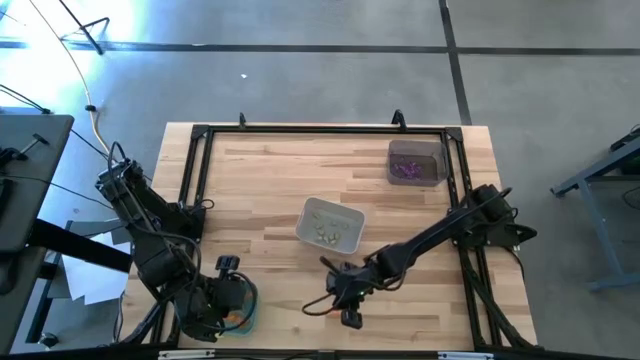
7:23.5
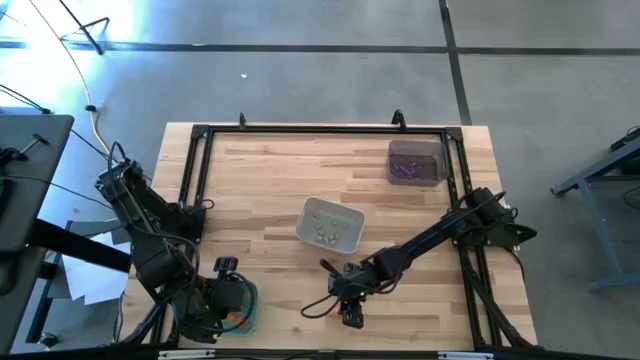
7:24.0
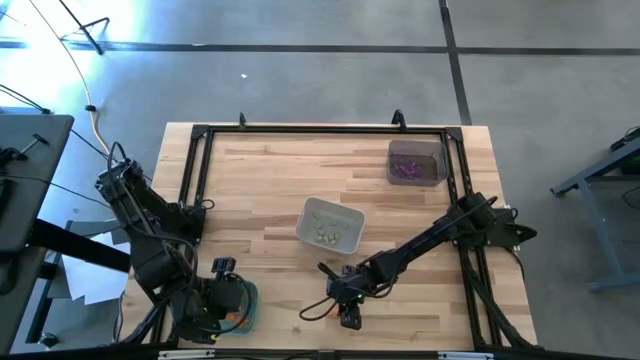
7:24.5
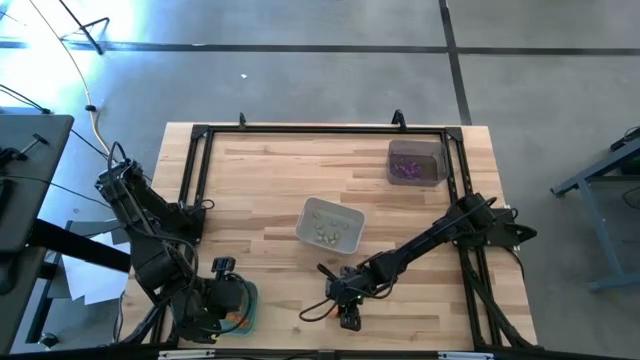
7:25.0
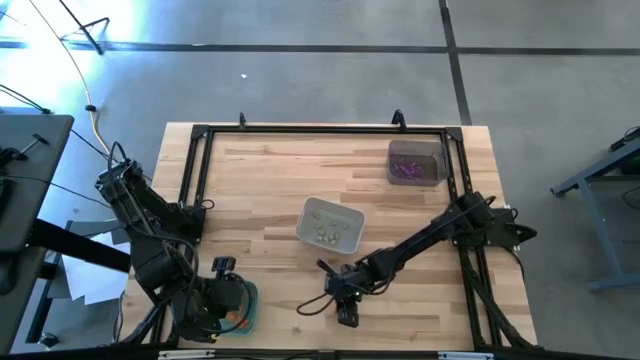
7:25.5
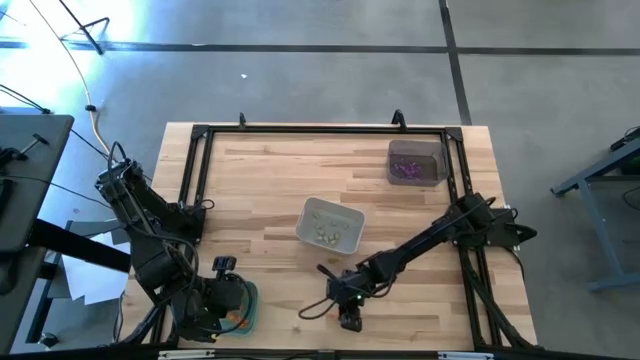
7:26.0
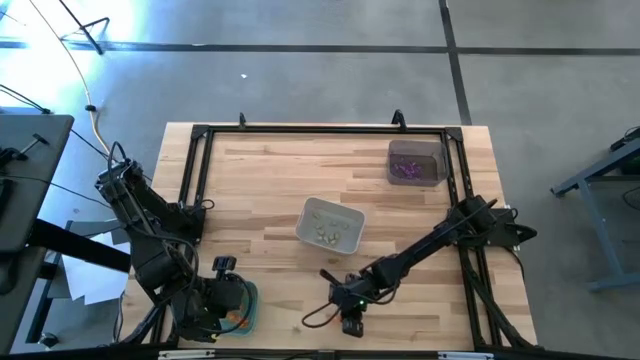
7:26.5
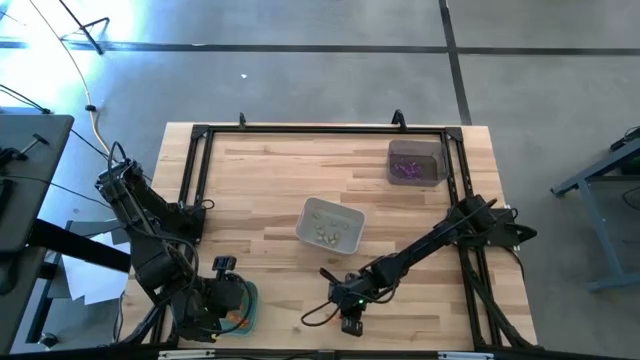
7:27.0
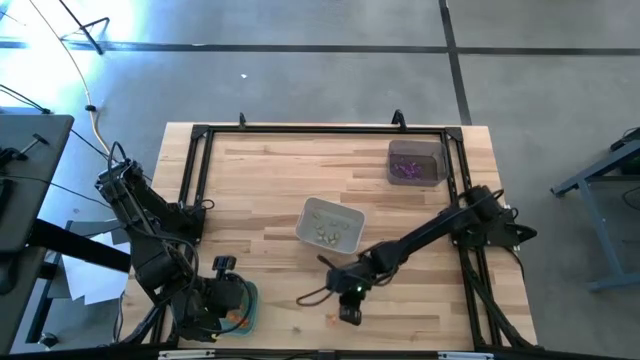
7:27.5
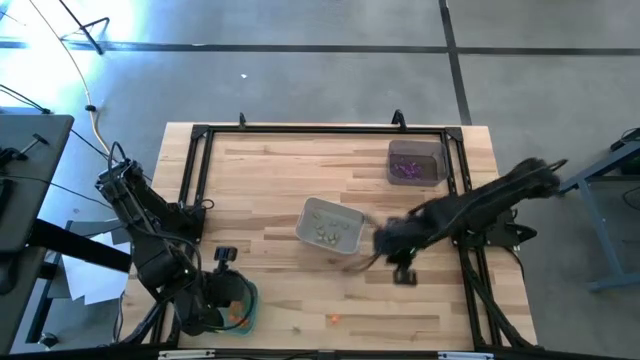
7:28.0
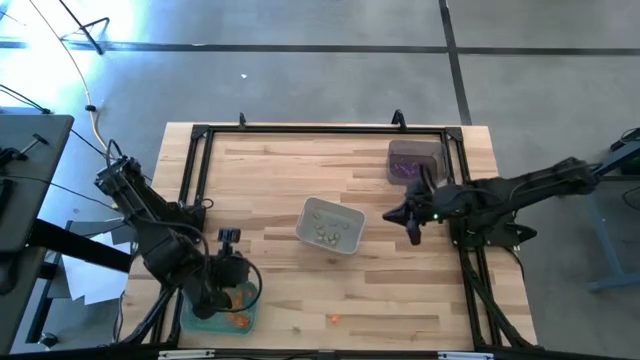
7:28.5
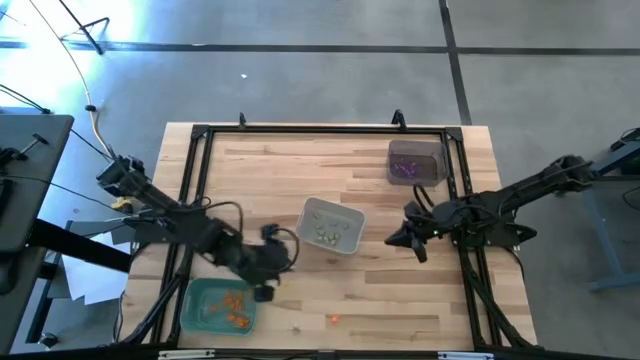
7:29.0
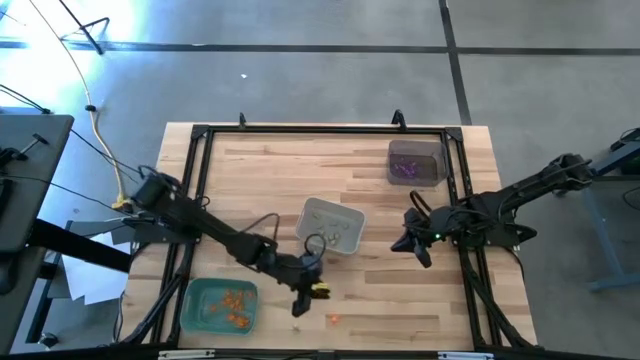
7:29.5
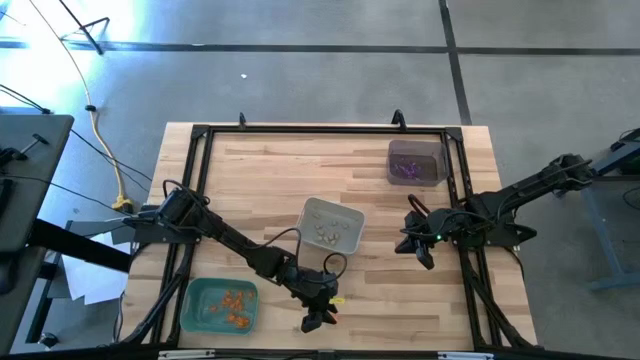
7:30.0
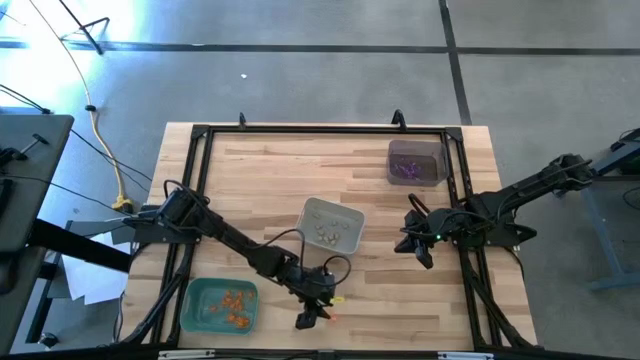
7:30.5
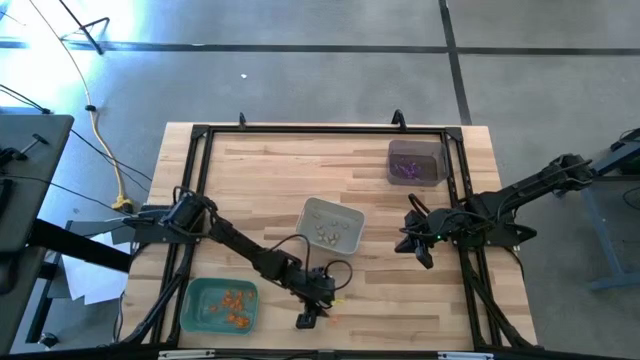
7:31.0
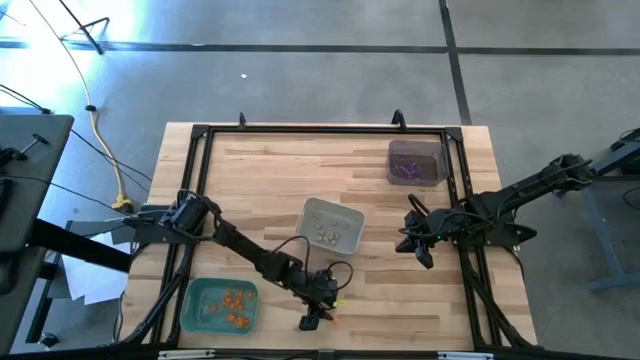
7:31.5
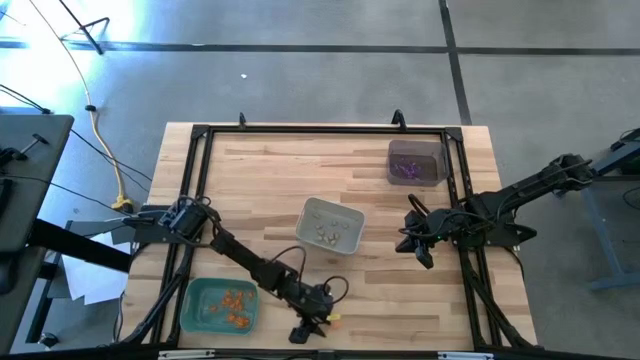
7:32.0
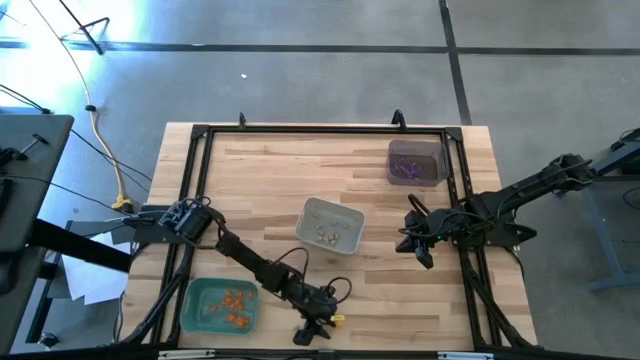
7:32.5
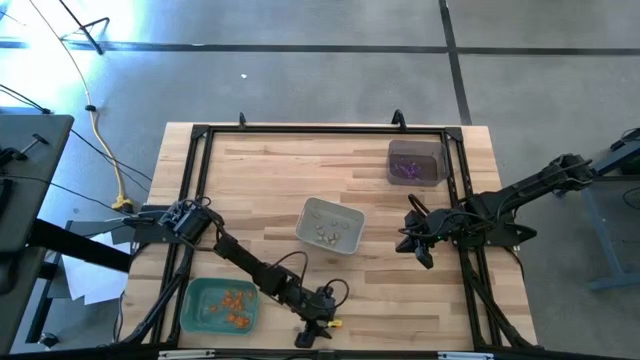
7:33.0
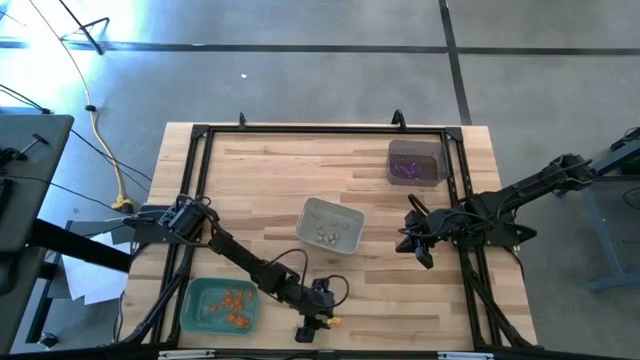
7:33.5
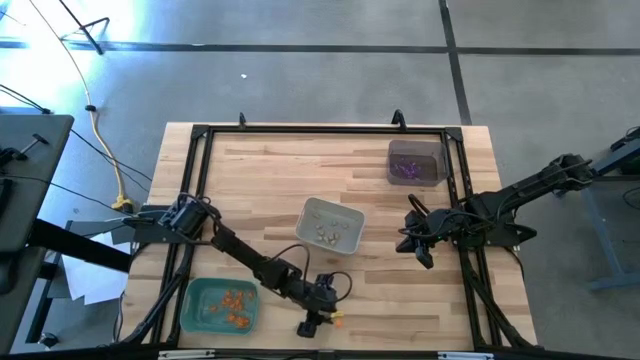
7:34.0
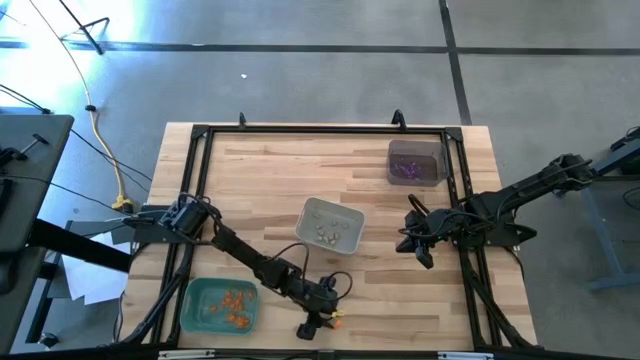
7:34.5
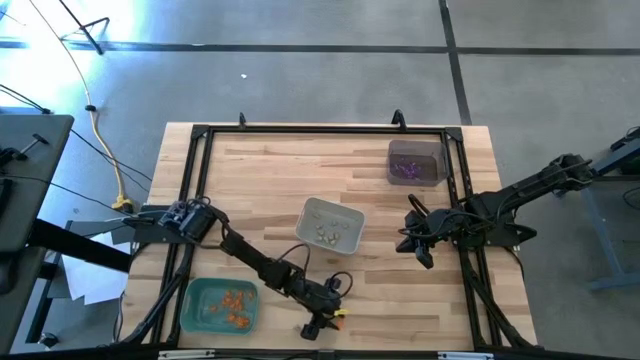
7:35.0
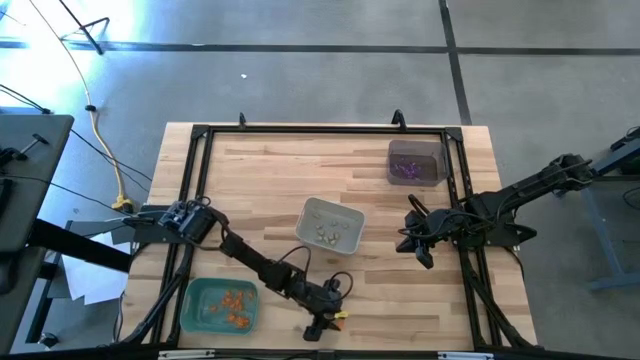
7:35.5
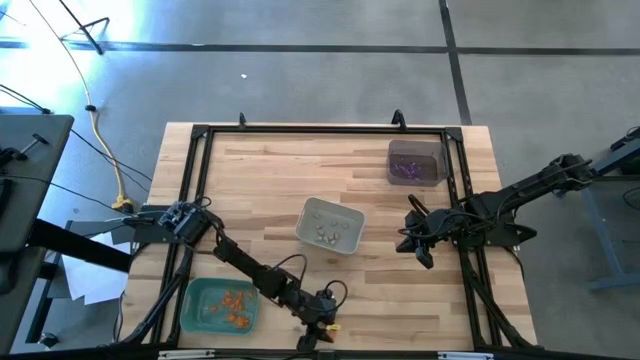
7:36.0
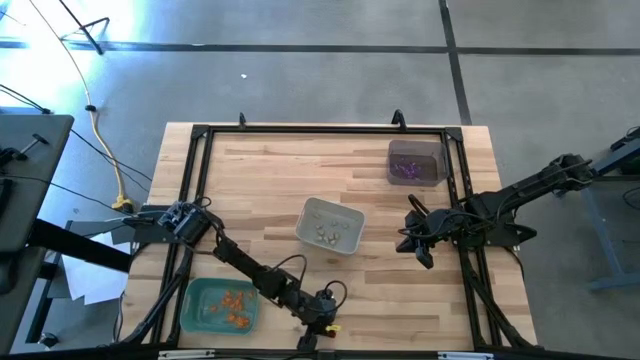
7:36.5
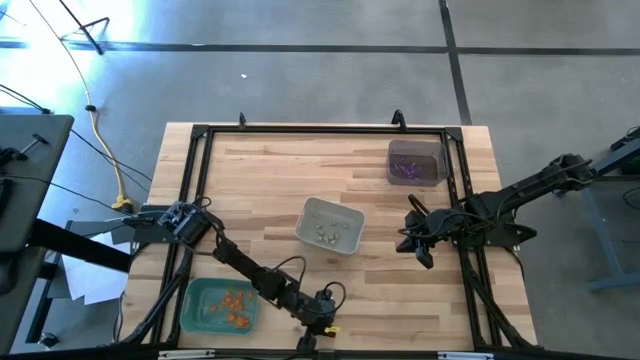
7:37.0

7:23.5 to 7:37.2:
Task: Sort Halloween decoration
Put the orange spider toy into the green bin

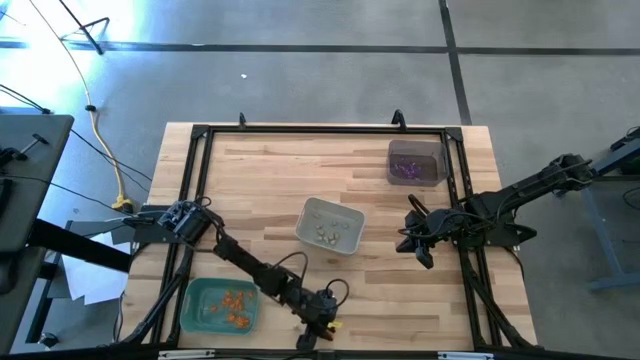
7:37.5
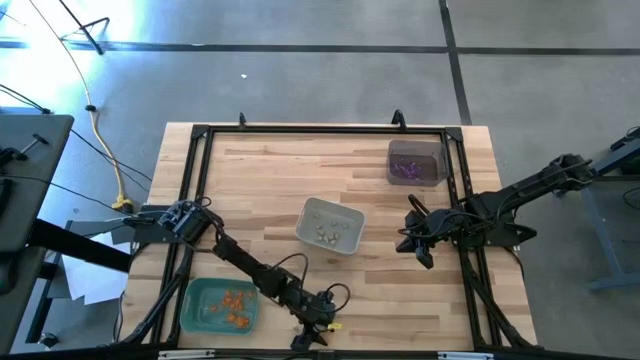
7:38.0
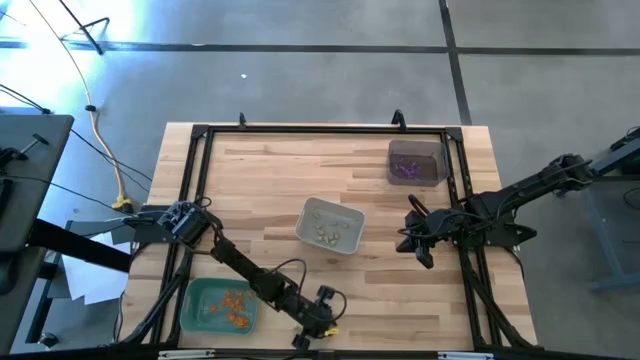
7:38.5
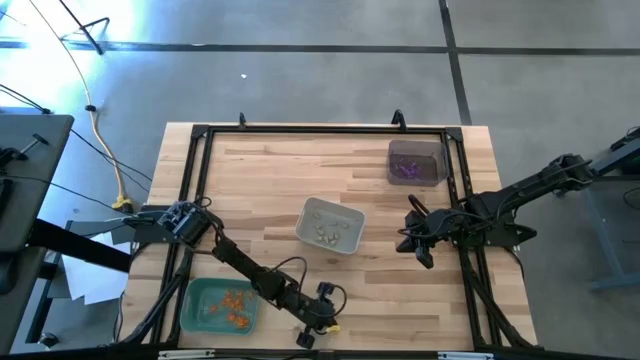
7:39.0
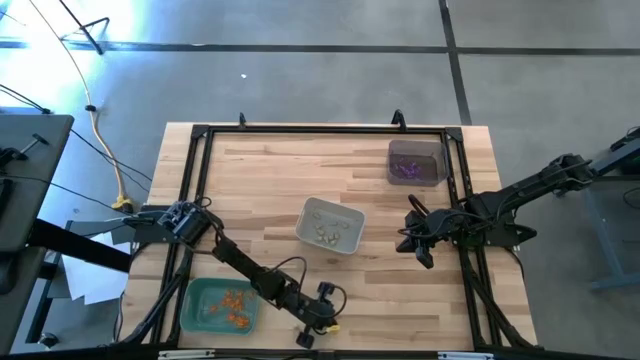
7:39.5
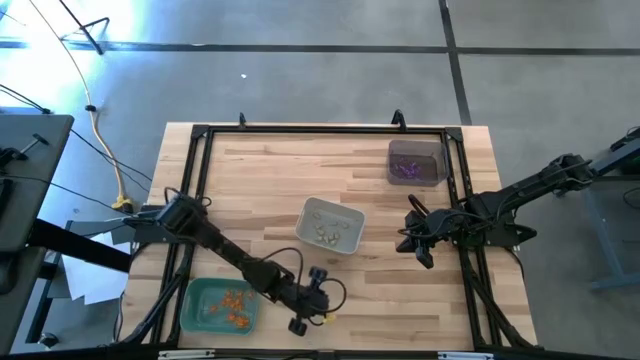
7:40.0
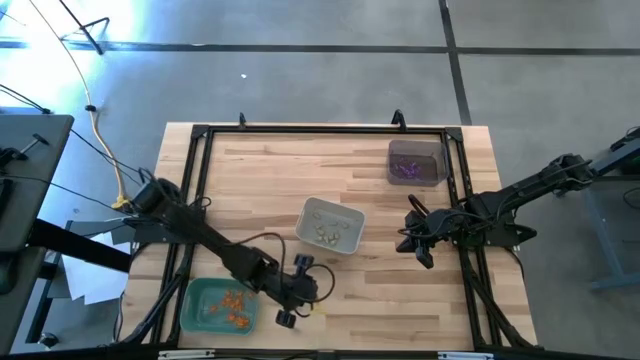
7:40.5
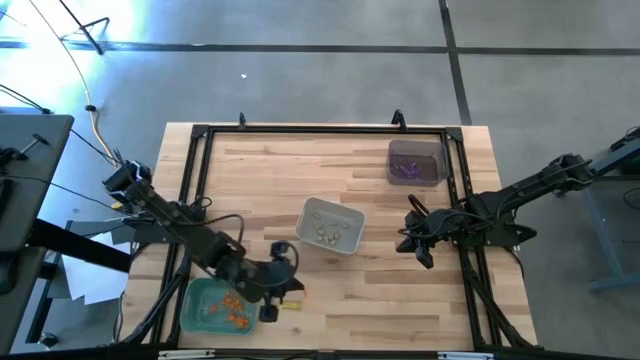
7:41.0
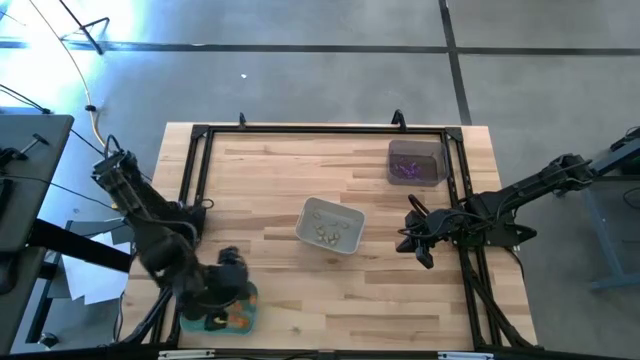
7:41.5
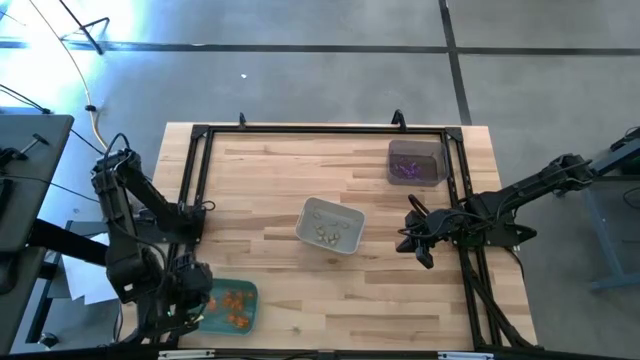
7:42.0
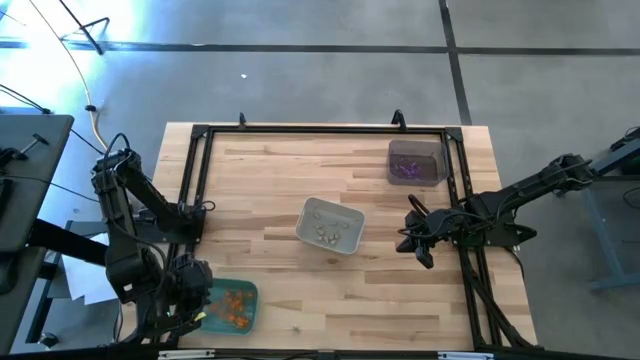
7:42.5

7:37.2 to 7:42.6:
Put the orange spider toy into the green bin

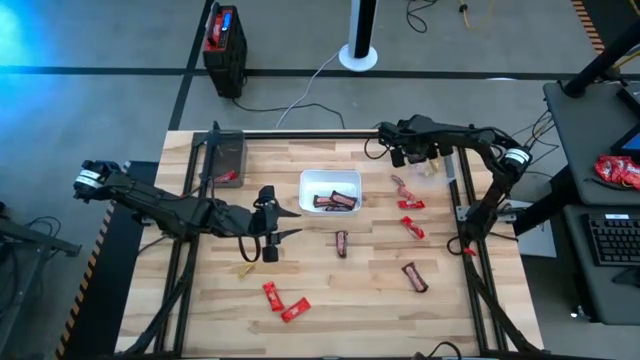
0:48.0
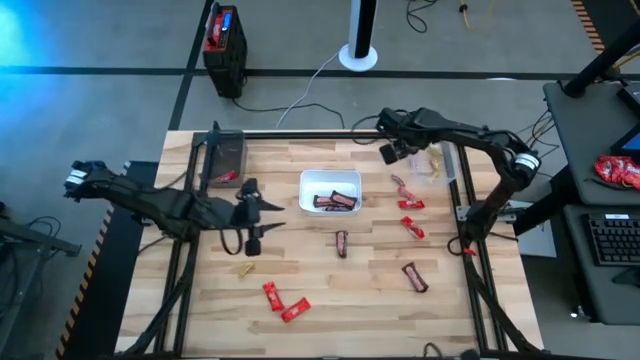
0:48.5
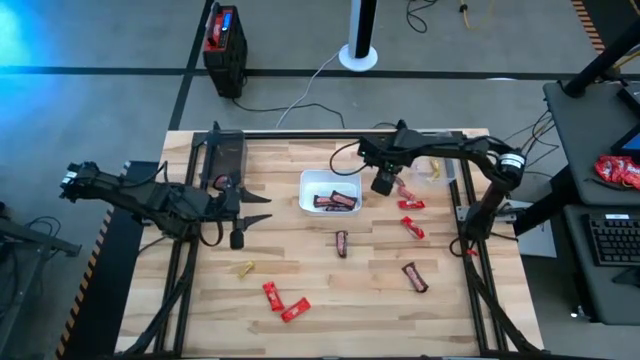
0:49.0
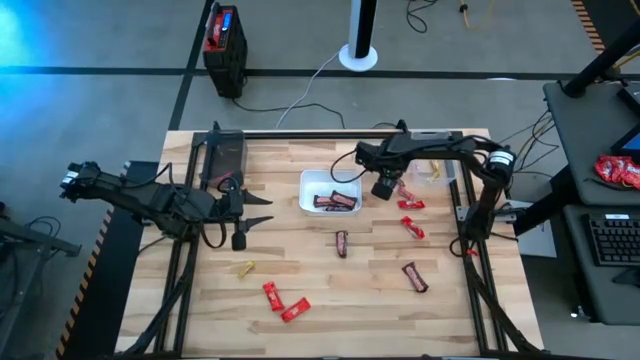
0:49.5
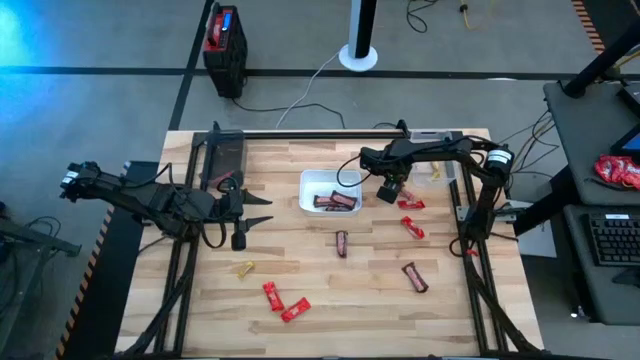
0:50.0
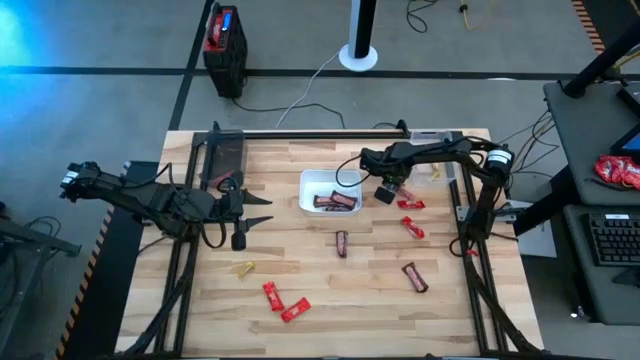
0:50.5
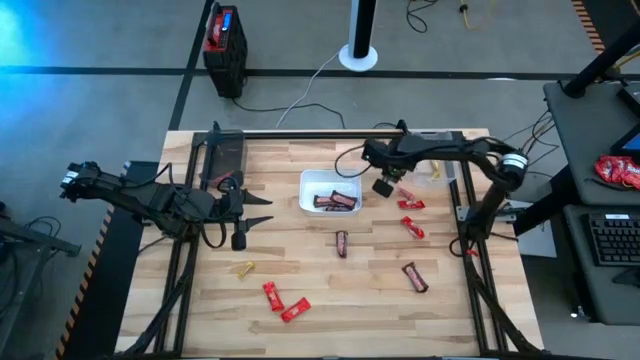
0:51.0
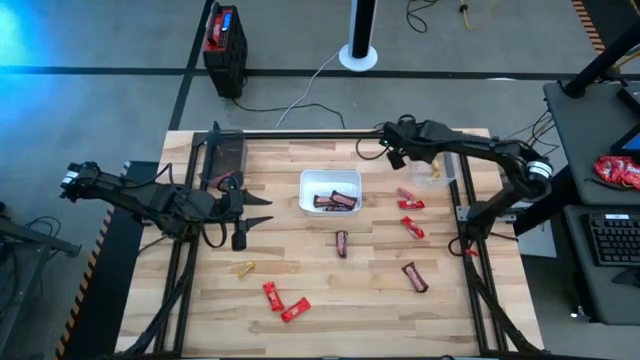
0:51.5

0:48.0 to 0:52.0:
Task: Sort candy by brand, put in halloween buckets
Put the red candy into the transparent bin
